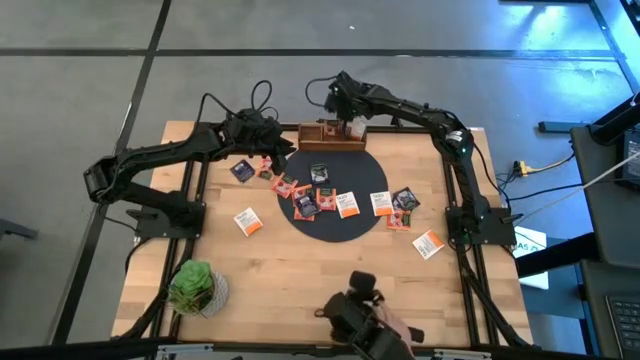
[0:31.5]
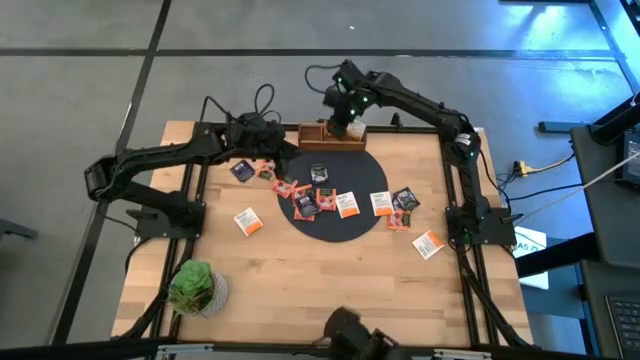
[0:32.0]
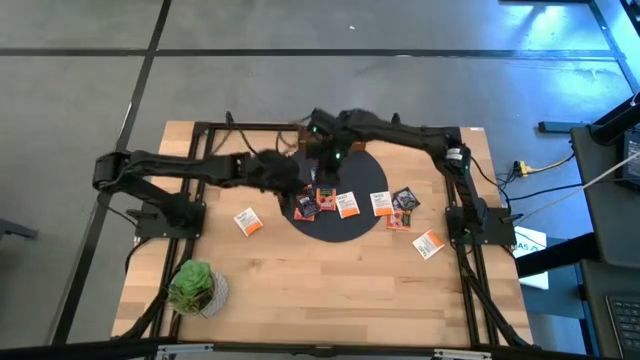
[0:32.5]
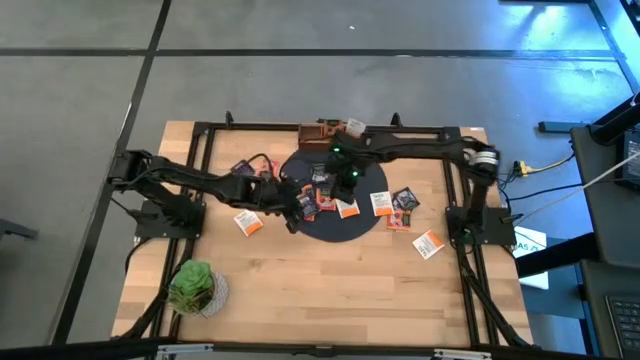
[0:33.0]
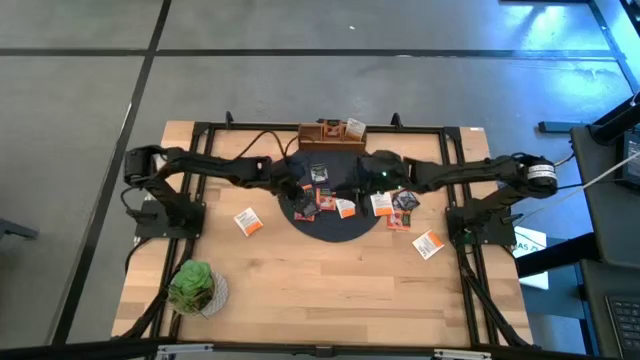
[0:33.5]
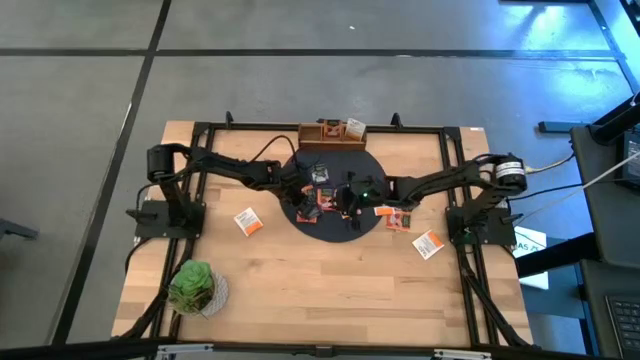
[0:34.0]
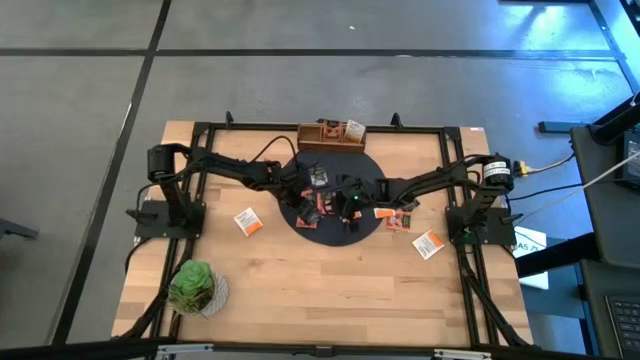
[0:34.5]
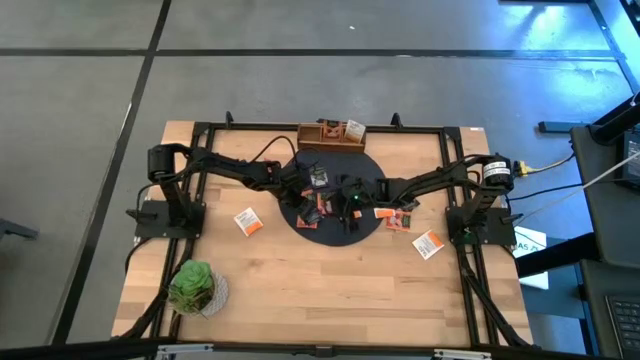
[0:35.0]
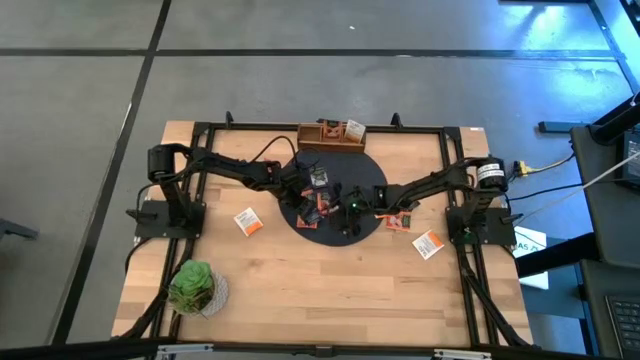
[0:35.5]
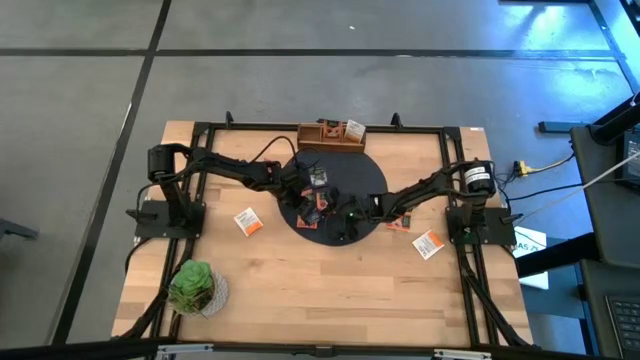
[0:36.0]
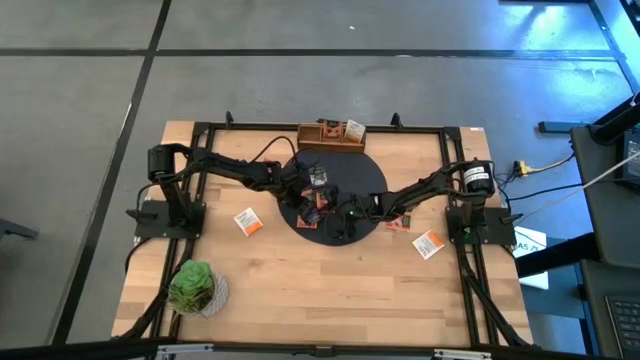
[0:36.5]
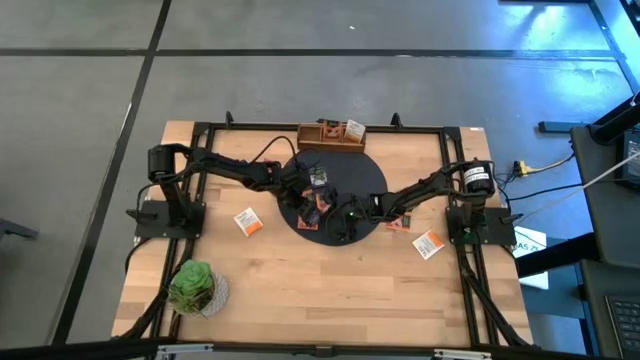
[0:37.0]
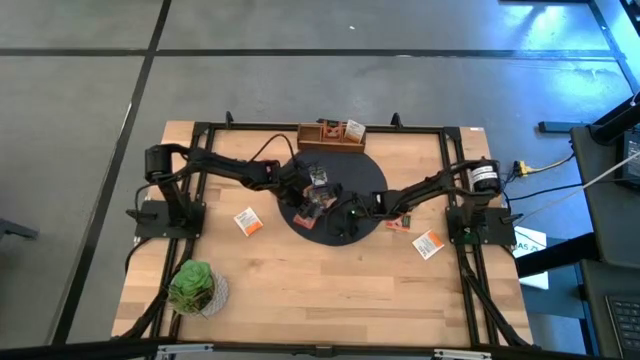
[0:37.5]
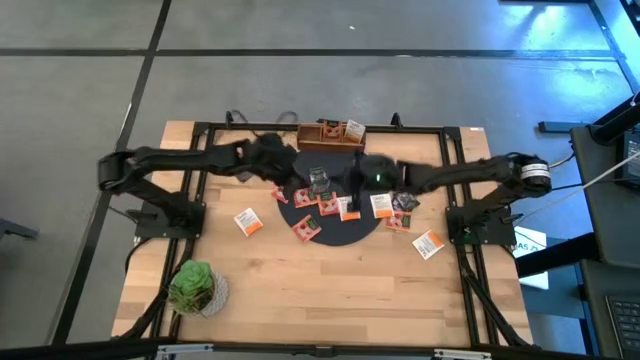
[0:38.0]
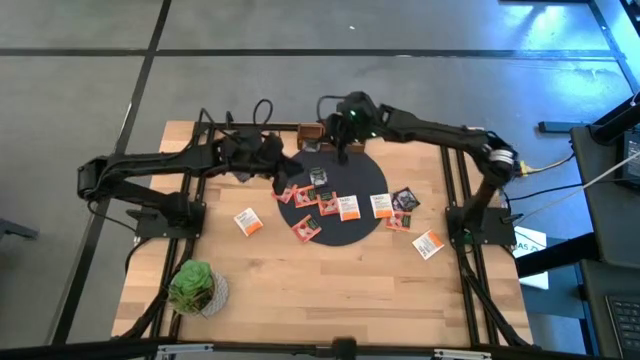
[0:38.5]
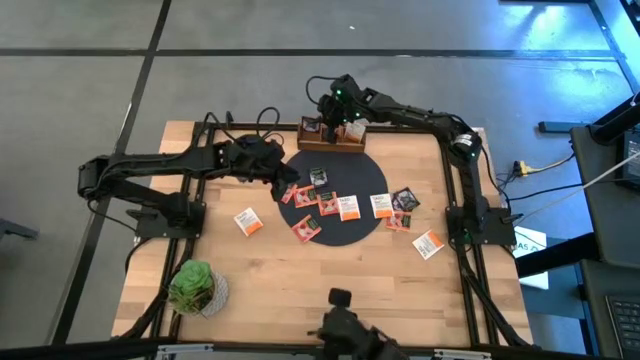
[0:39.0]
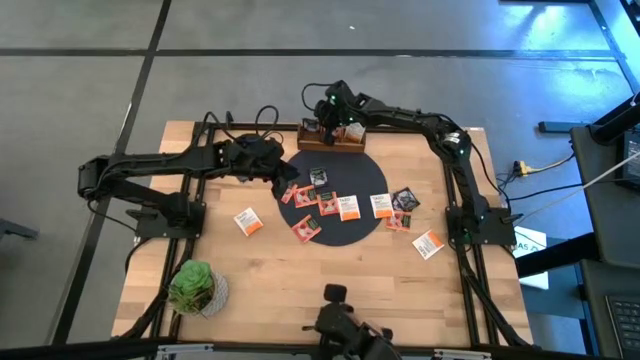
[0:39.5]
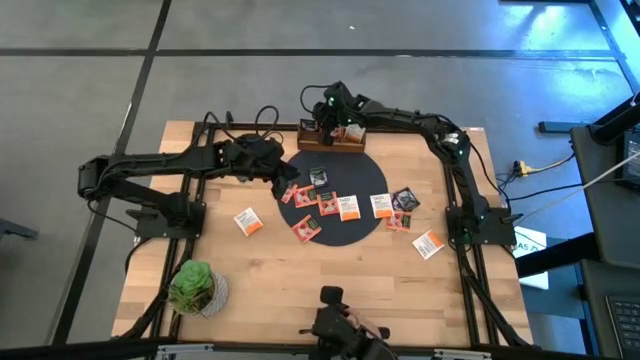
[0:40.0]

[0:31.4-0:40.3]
Task: Pick & Place Tea
Put the purple tea bag into the left section of the wooden organizer

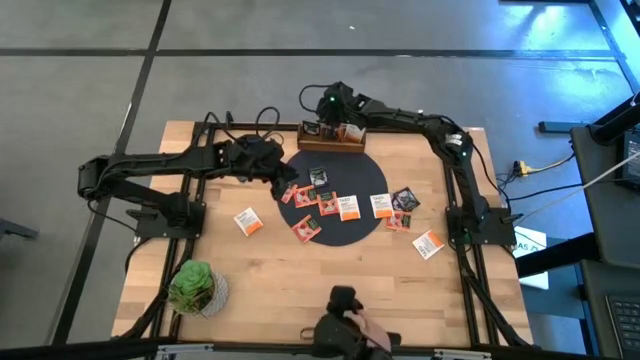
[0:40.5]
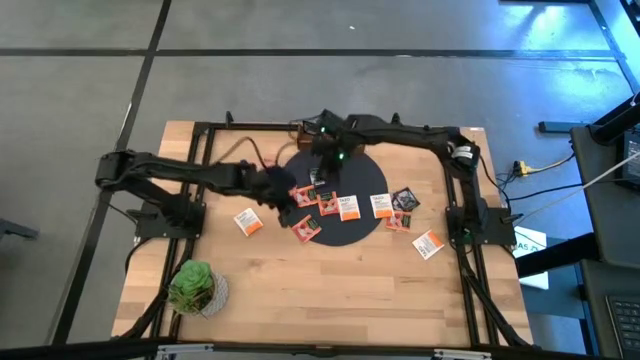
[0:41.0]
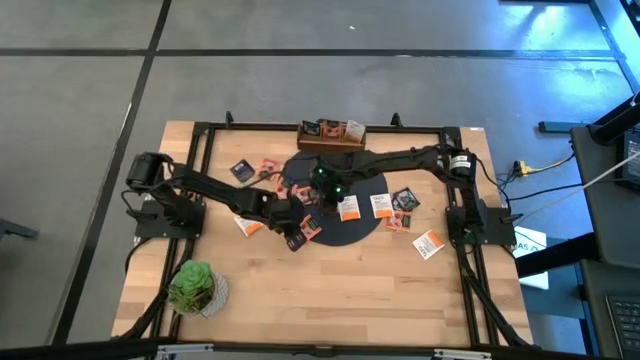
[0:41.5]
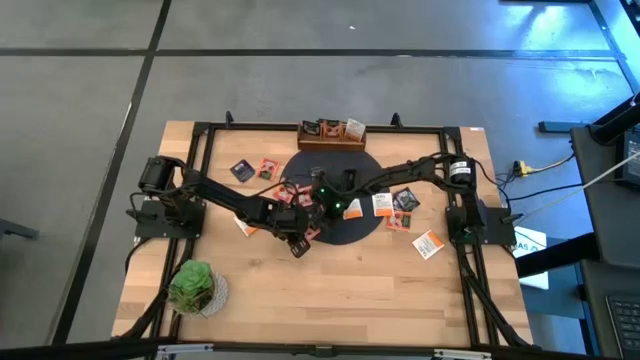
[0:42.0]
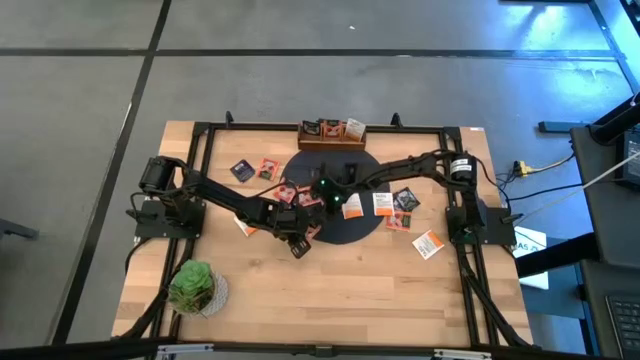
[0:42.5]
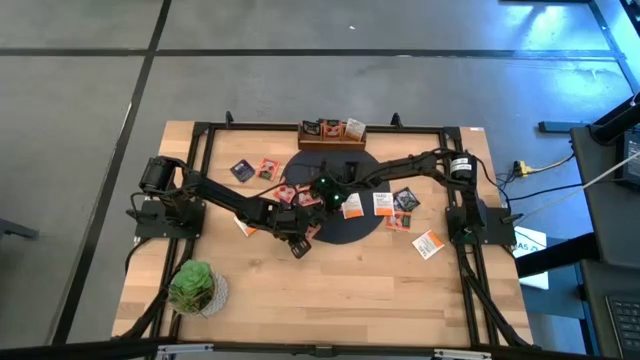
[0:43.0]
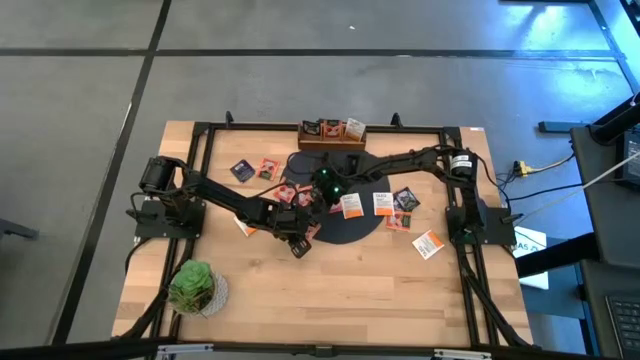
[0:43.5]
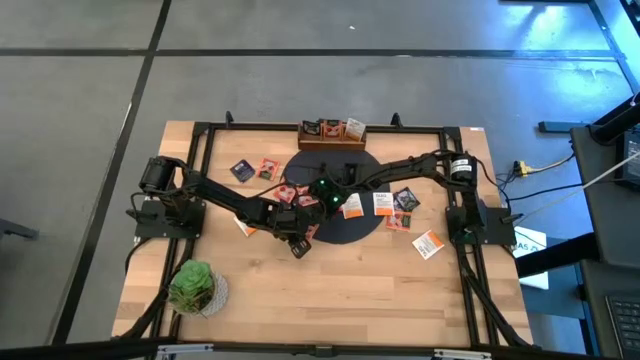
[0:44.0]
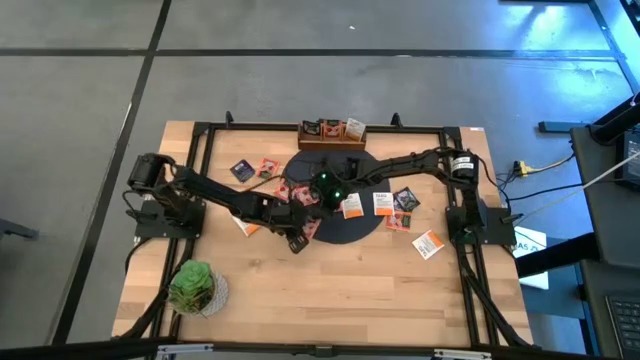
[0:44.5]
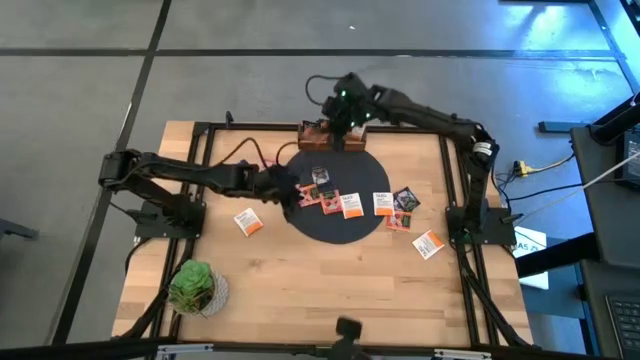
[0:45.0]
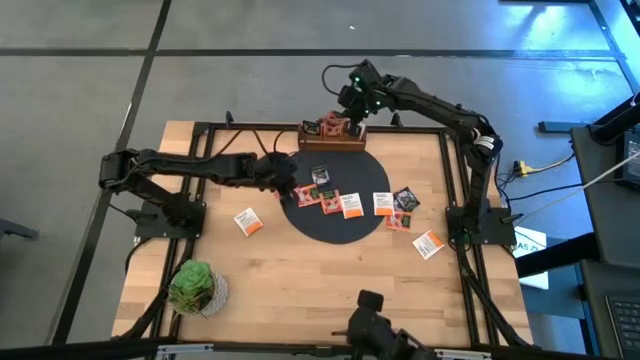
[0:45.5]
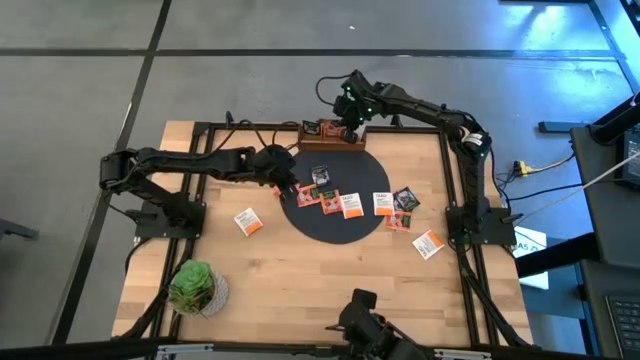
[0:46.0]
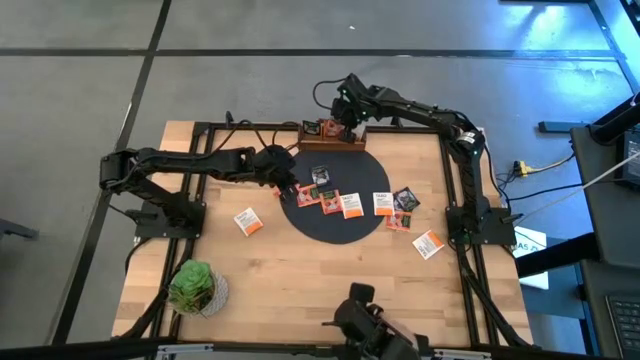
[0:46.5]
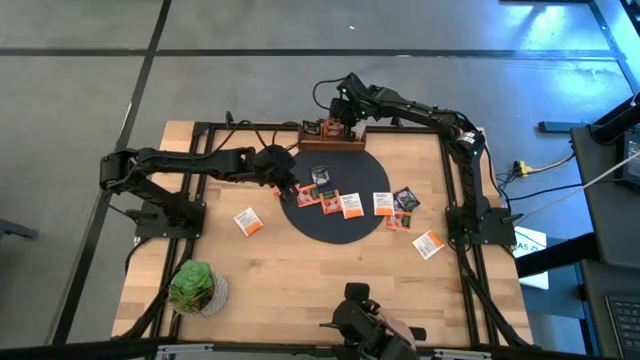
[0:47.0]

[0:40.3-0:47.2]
Put the orange tea bag into the middle section of the wooden organizer

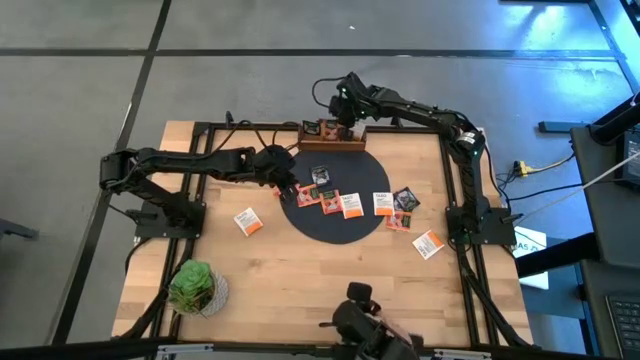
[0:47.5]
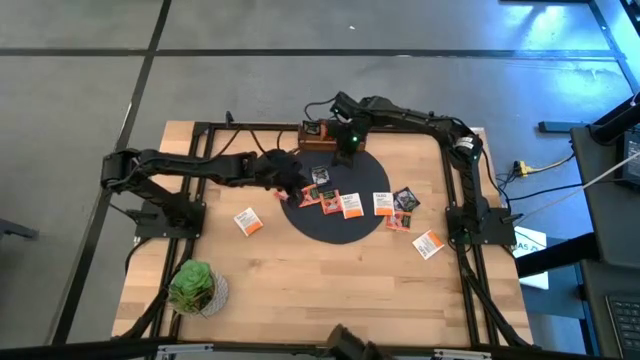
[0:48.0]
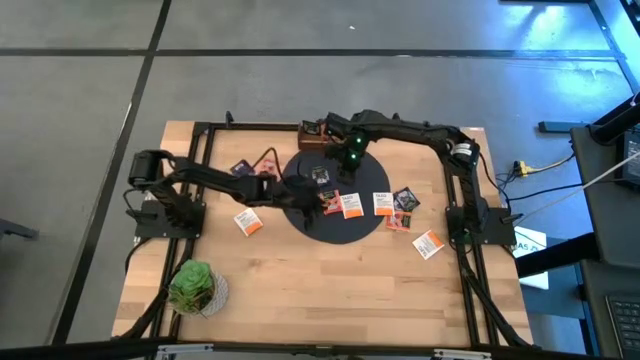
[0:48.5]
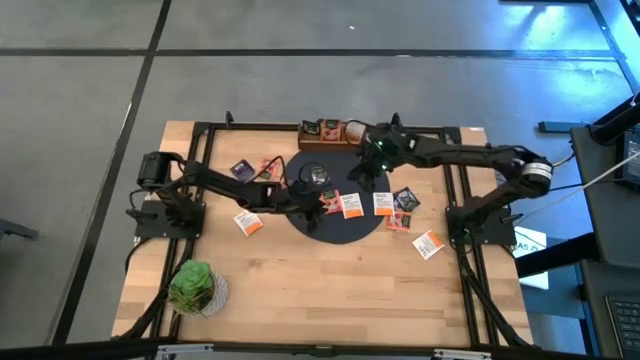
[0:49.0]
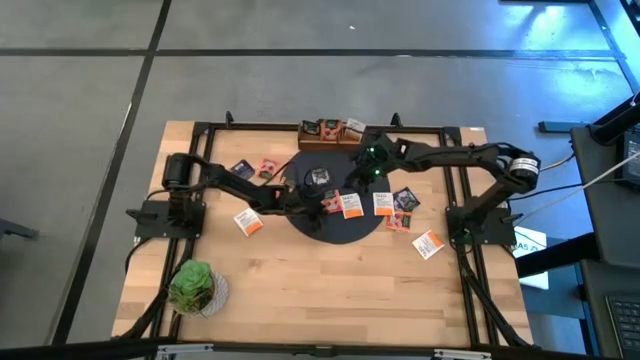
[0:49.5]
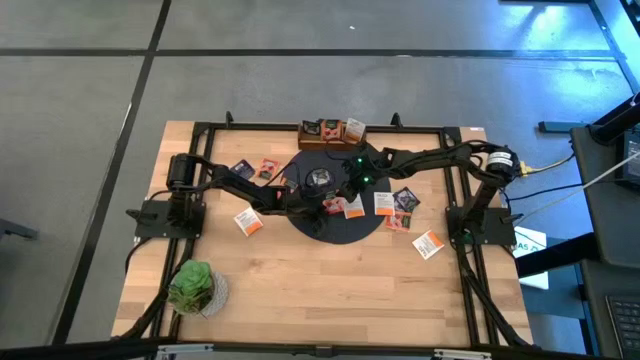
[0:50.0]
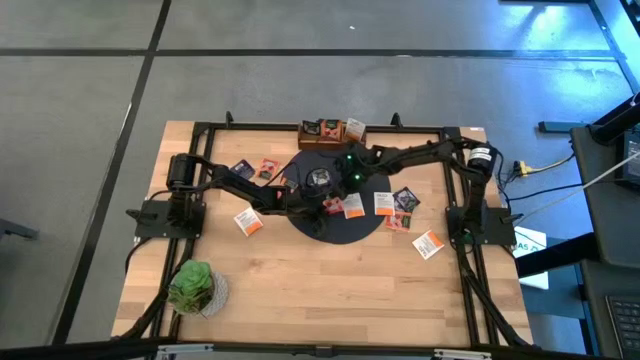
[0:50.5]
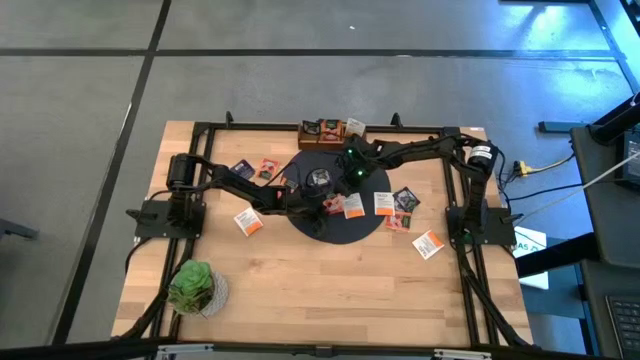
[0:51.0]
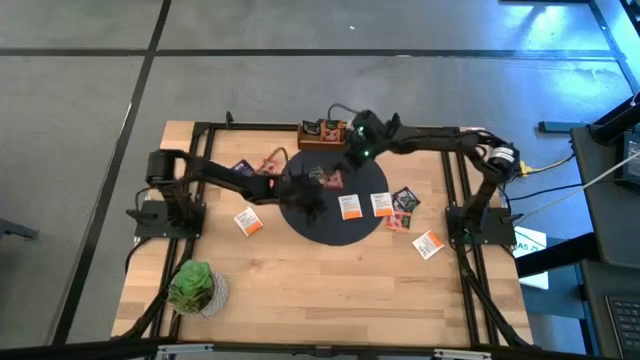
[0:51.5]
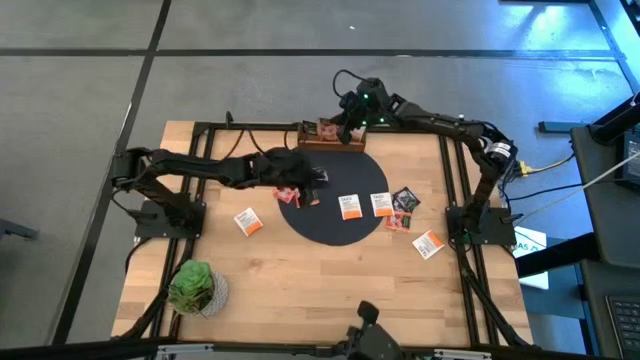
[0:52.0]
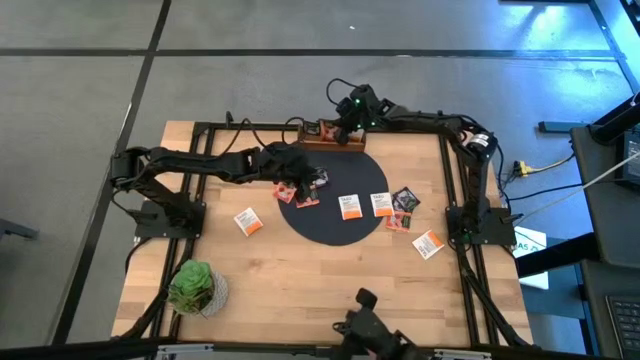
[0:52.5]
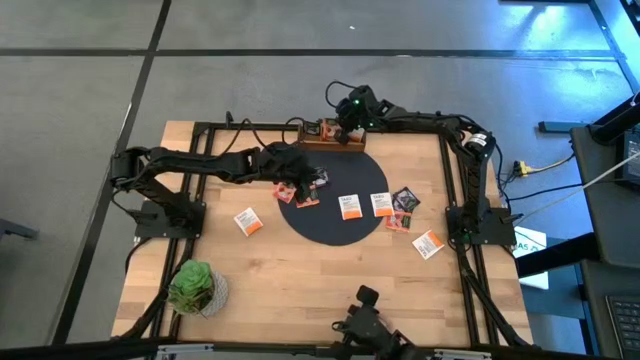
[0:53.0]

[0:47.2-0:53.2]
Put the orange tea bag into the middle section of the wooden organizer
